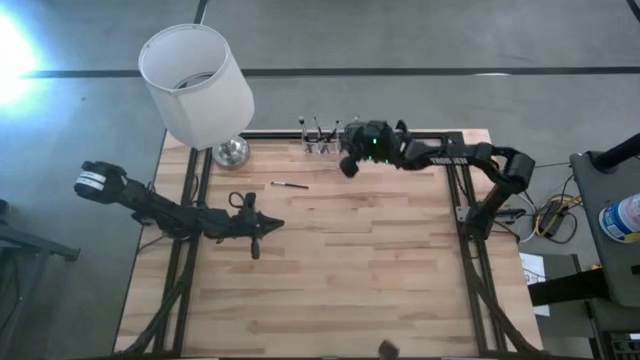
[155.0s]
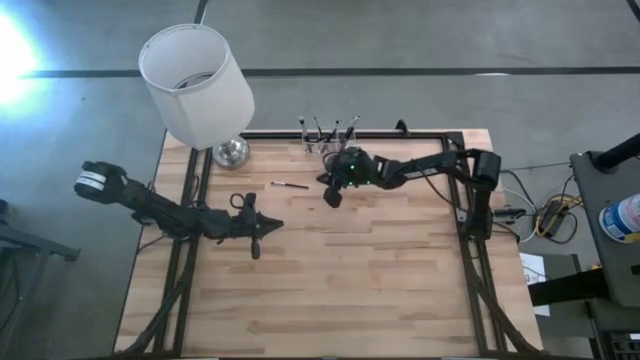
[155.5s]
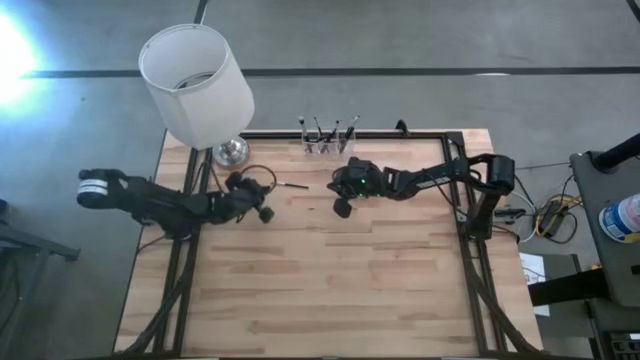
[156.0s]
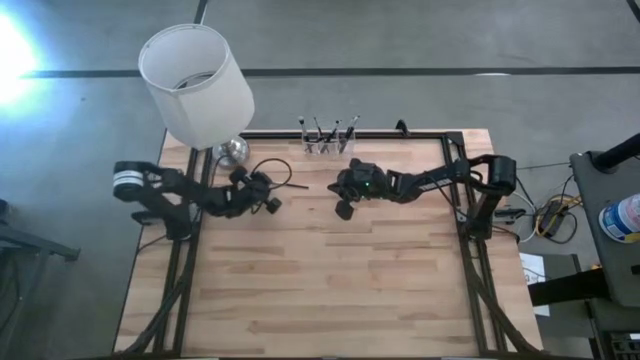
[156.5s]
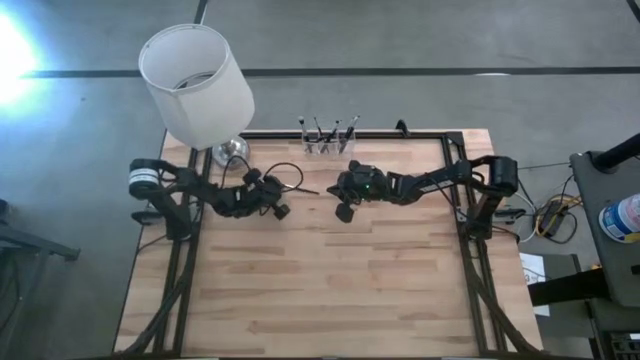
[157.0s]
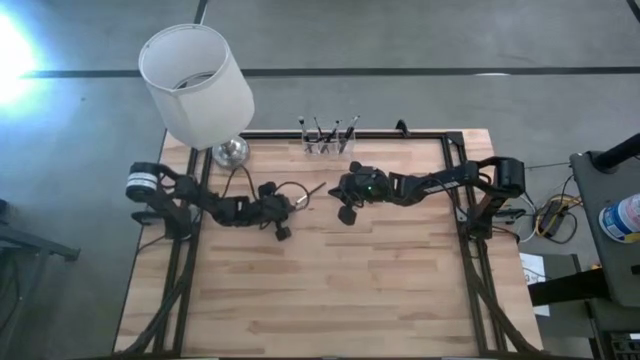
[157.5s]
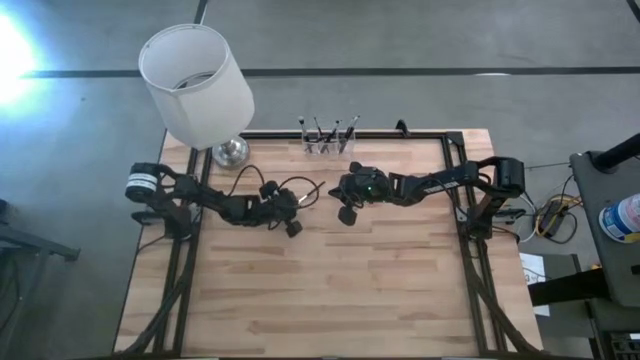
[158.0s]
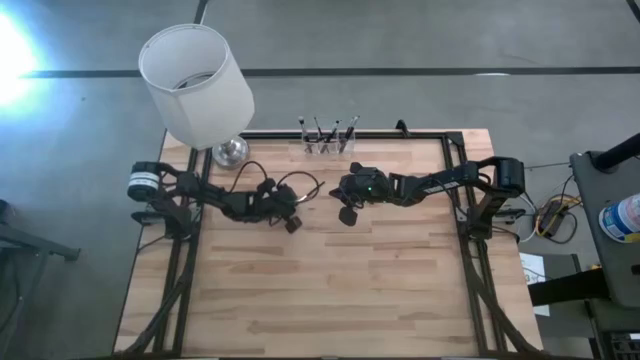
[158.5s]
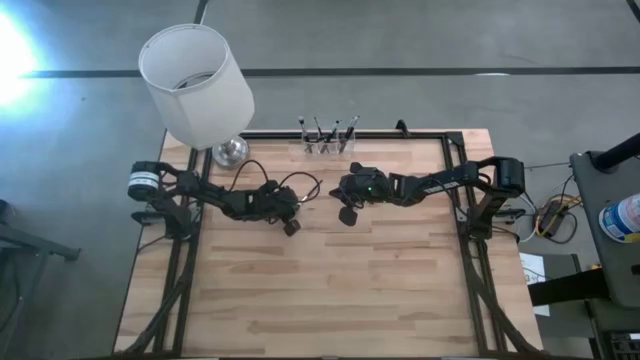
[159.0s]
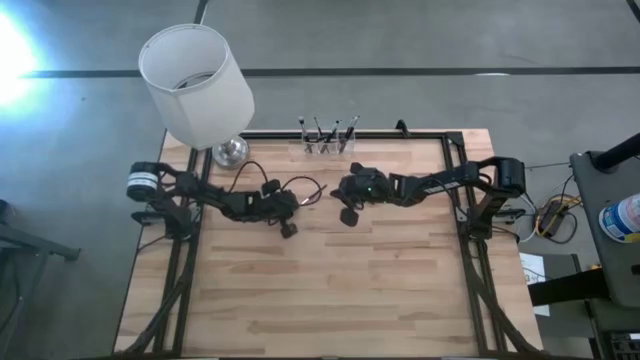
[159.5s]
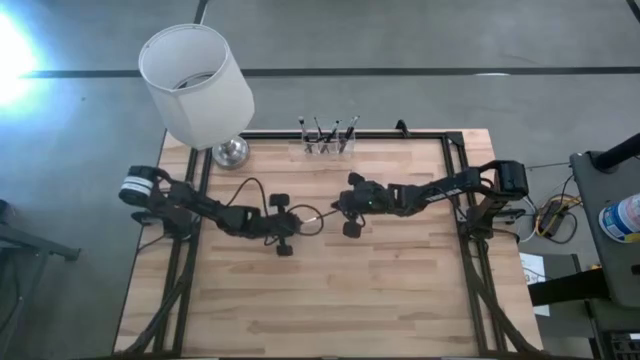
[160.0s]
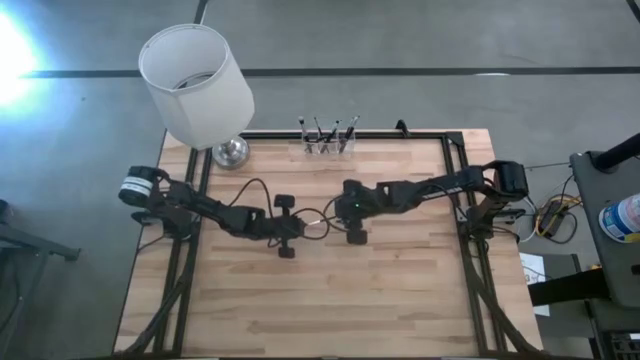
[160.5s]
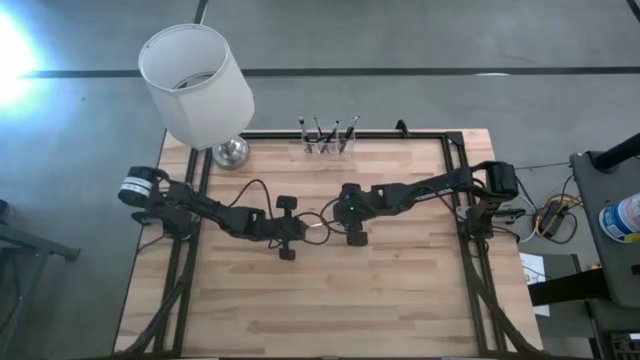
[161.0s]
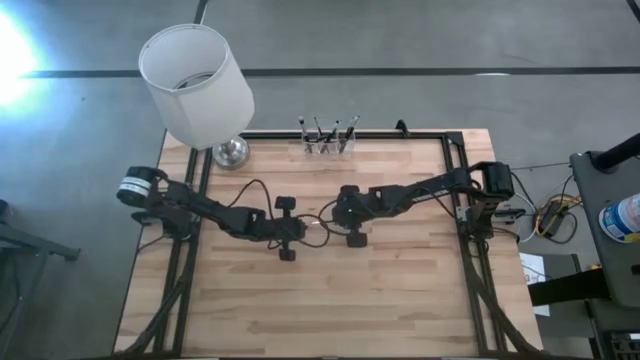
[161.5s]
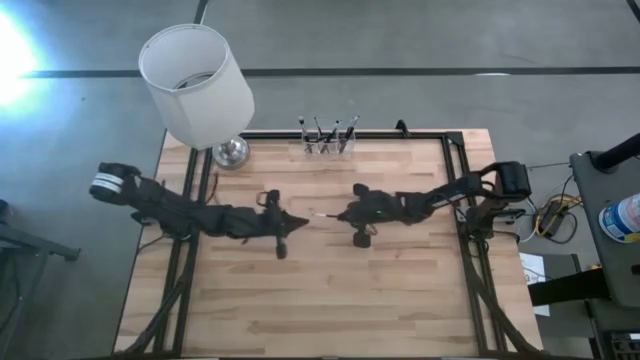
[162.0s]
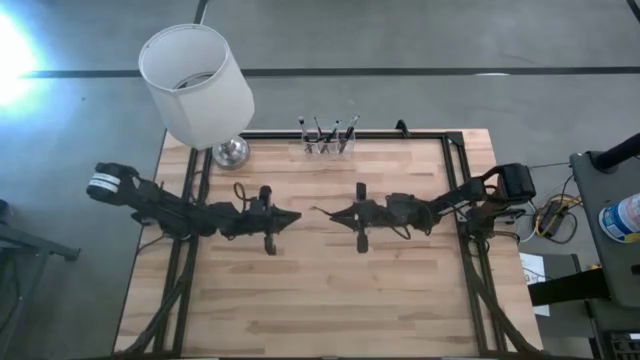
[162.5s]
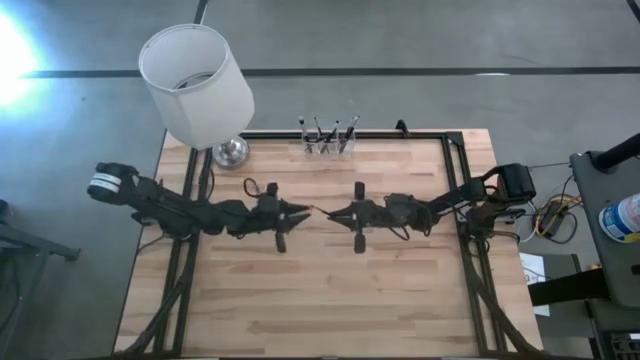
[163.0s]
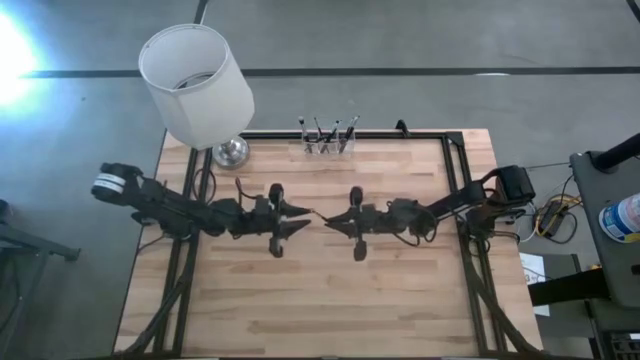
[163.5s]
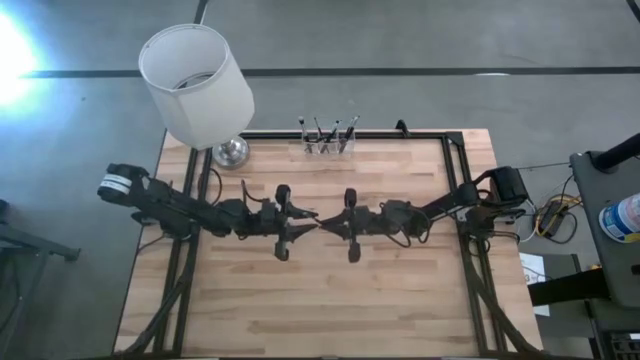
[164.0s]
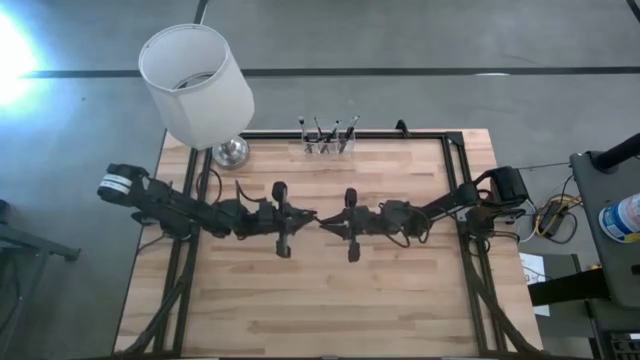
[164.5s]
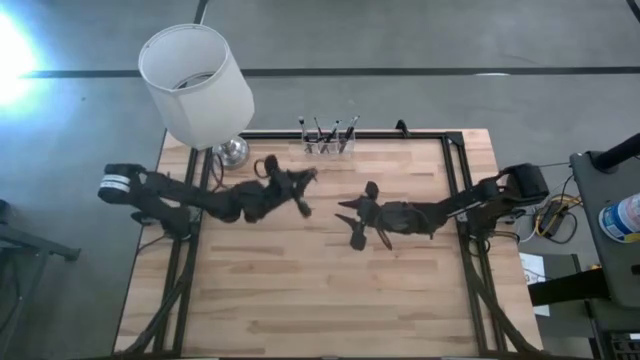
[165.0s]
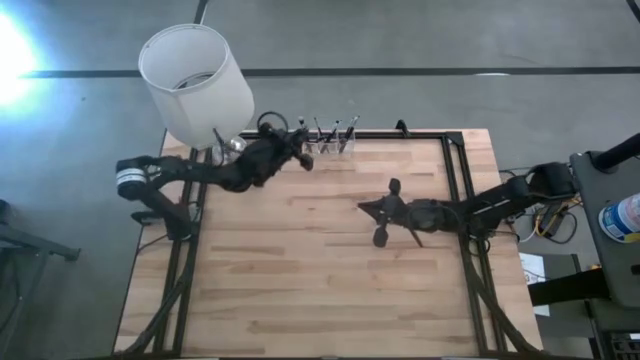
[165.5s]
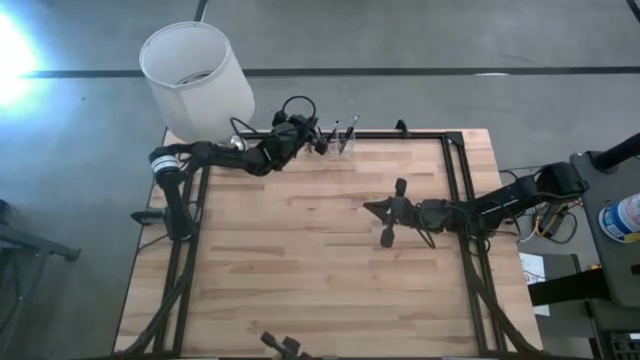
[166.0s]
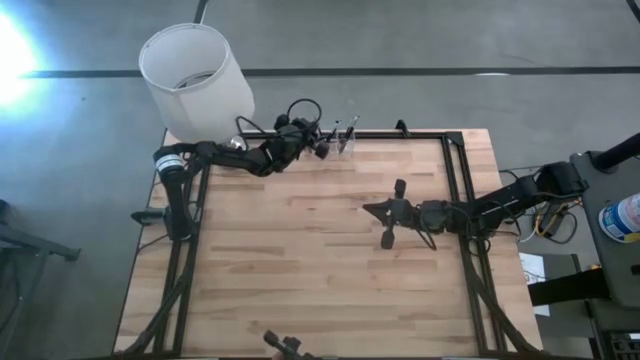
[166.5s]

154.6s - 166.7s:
Task: Put items in baskets/containers
Put the eyeshadow brush into the transparent organizer

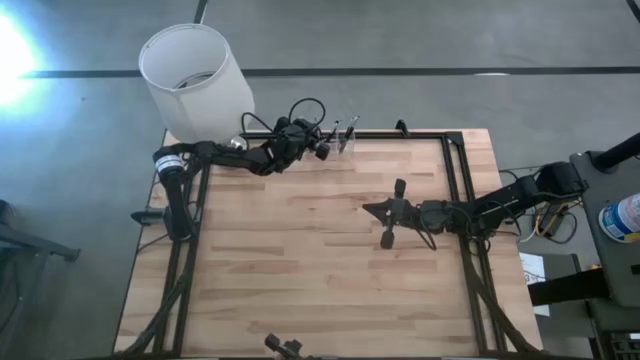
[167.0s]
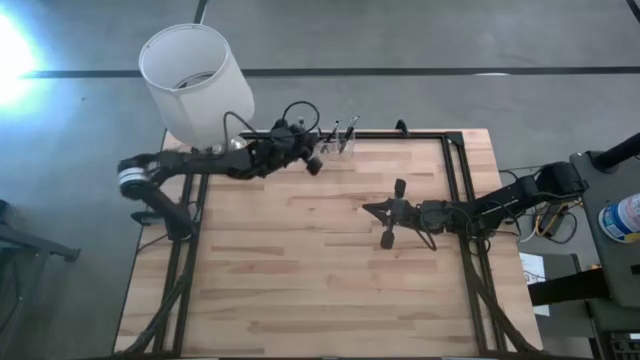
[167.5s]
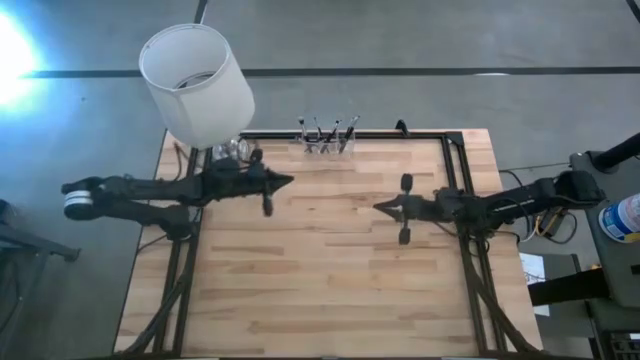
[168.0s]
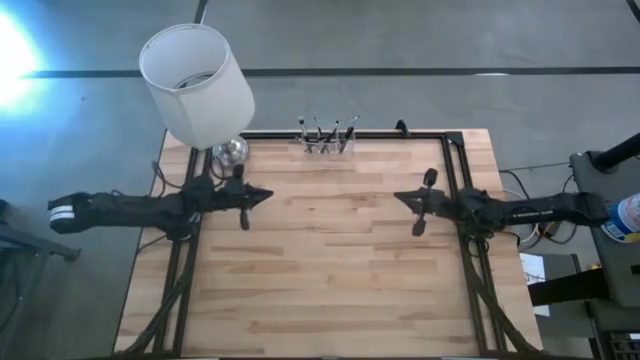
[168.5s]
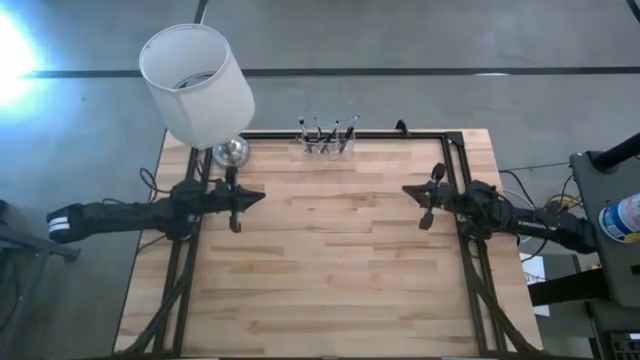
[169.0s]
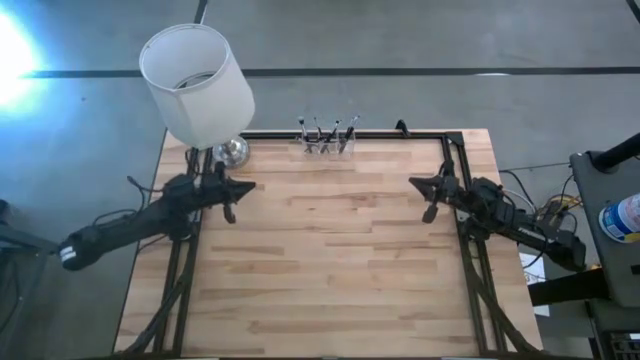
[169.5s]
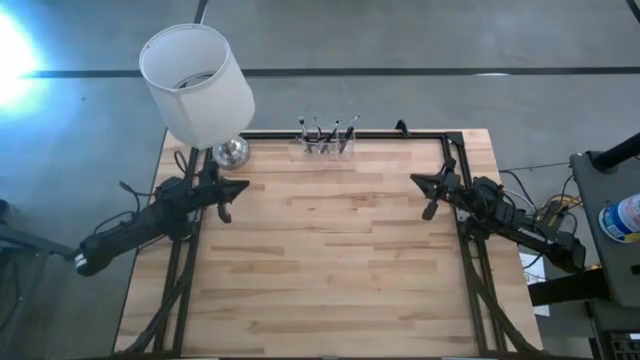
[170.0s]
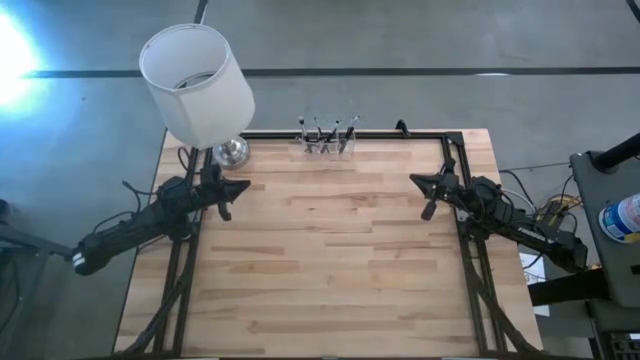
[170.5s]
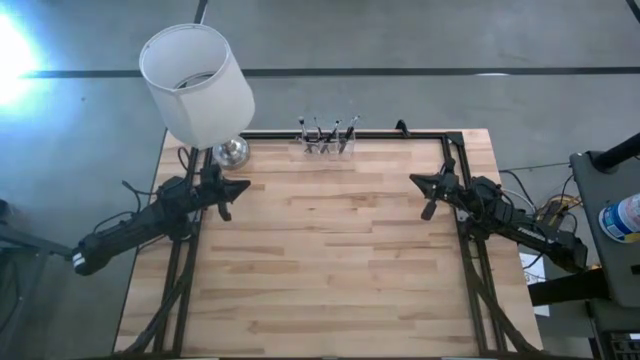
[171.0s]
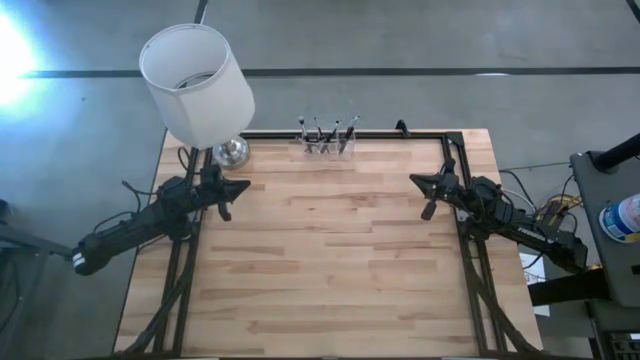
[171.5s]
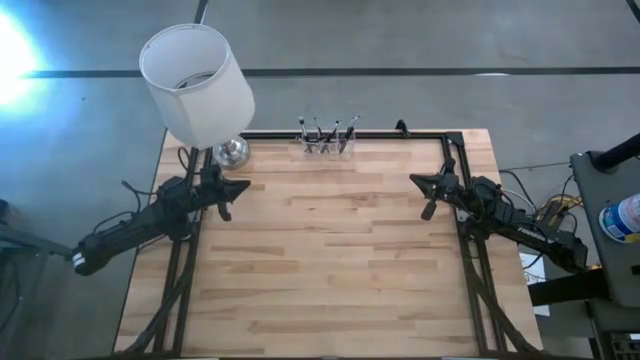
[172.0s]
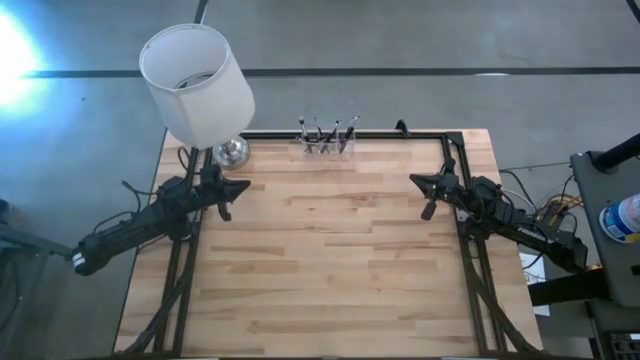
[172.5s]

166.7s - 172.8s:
Return to home position

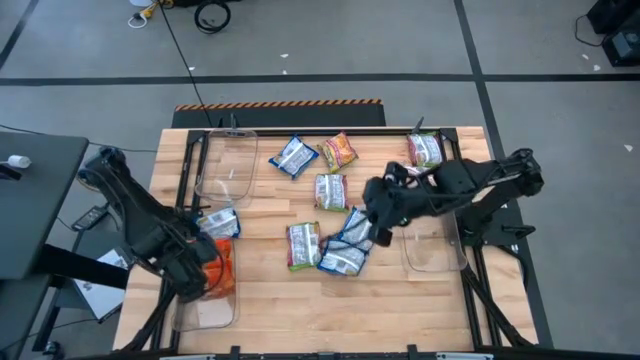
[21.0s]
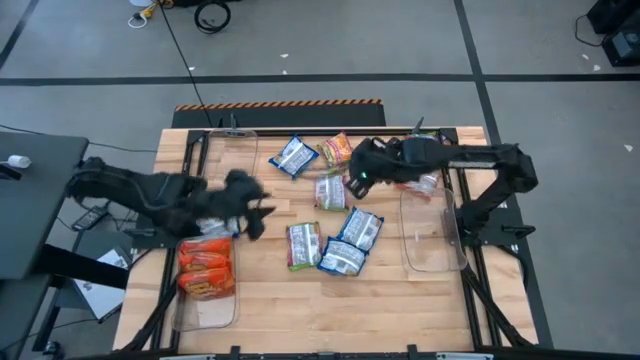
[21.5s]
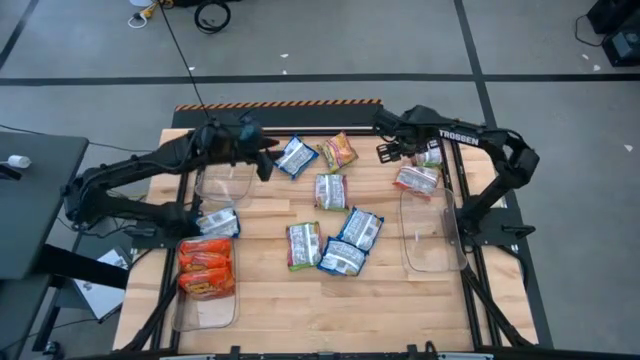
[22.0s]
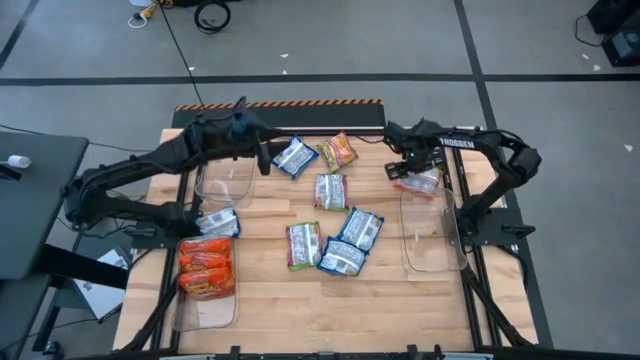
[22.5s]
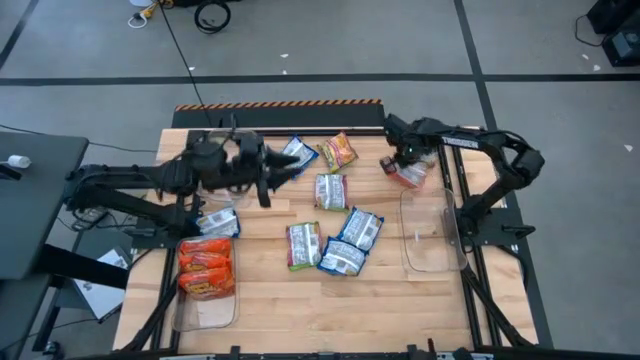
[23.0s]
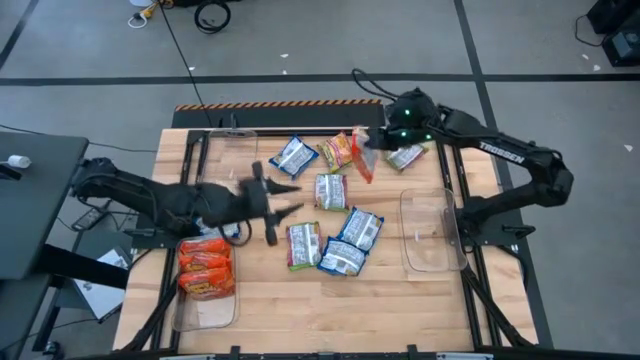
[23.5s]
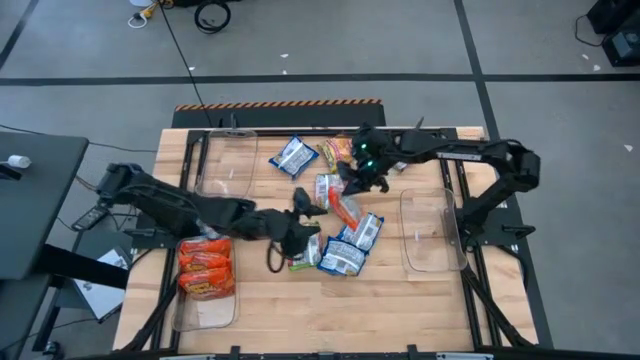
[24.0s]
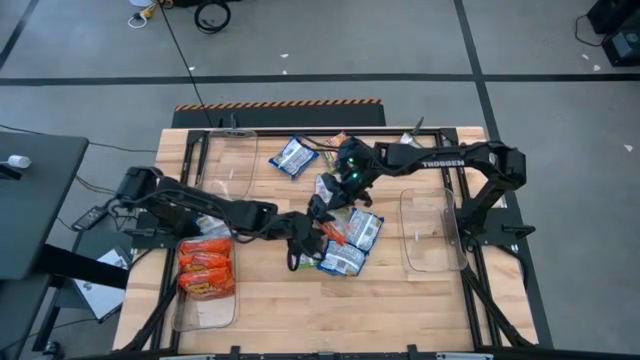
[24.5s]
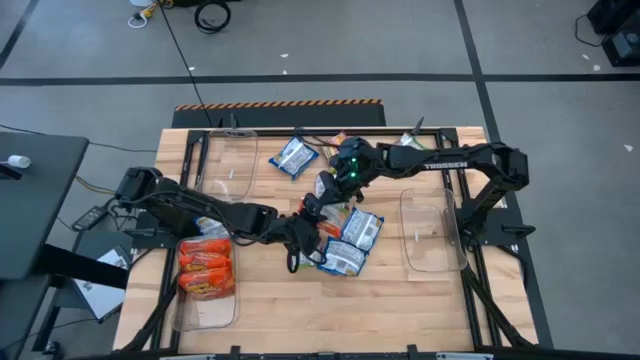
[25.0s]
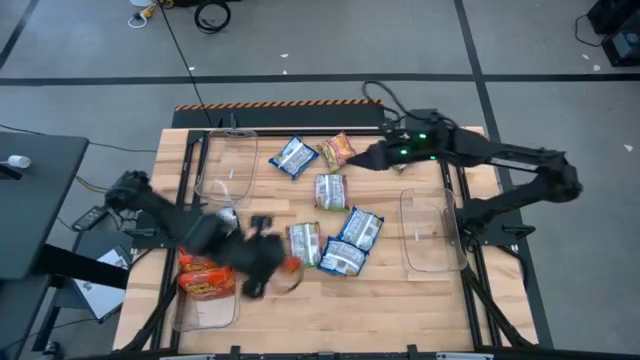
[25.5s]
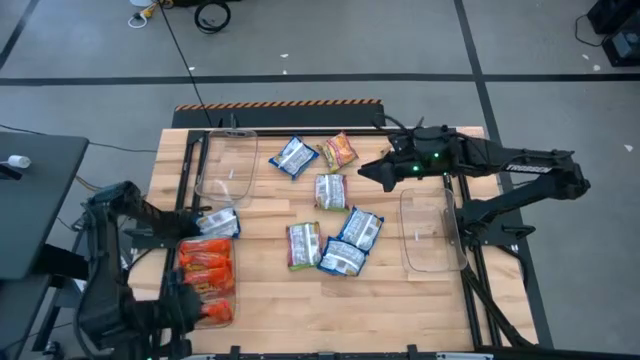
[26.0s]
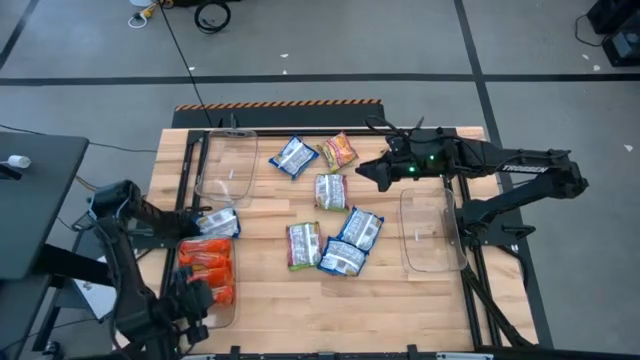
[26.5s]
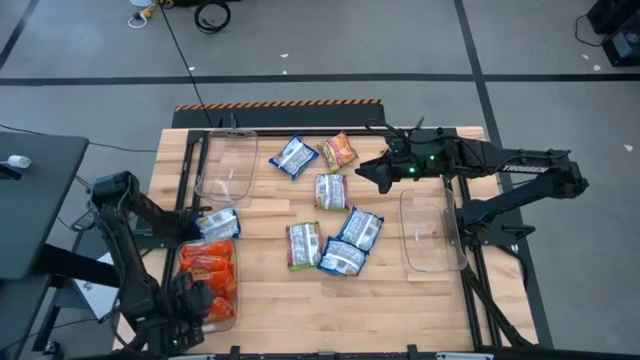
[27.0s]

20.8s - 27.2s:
Task: Sort Maruchan noodles
Put the orange noodle pack into the bottom left transparent bin
